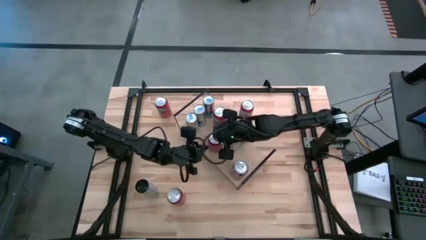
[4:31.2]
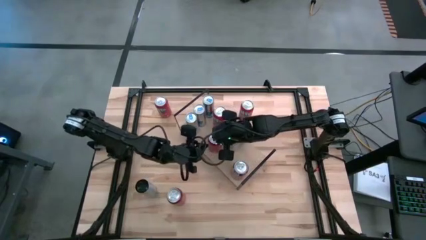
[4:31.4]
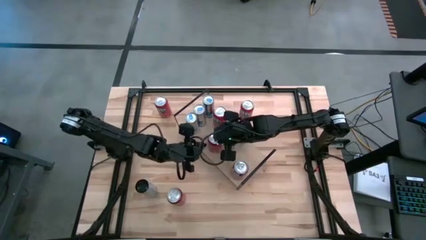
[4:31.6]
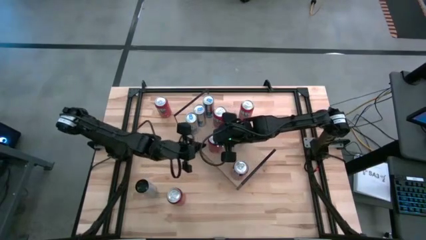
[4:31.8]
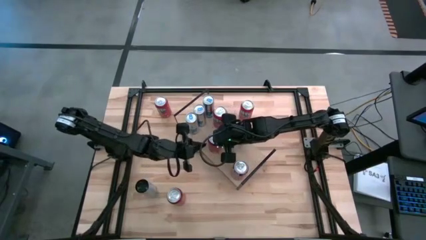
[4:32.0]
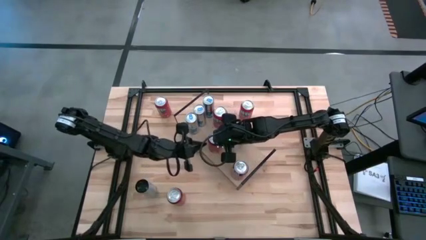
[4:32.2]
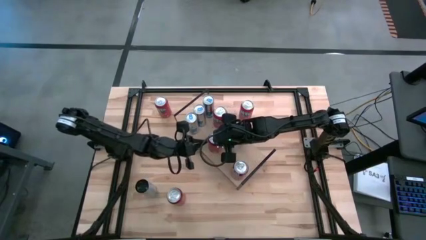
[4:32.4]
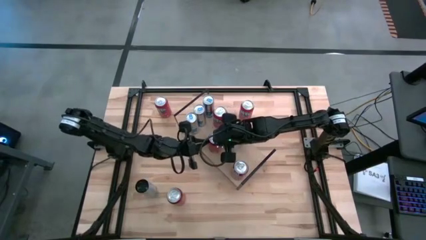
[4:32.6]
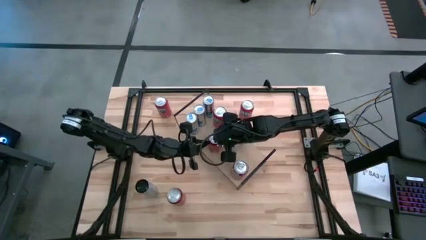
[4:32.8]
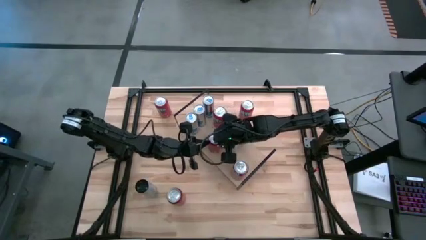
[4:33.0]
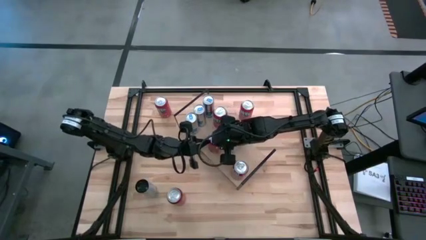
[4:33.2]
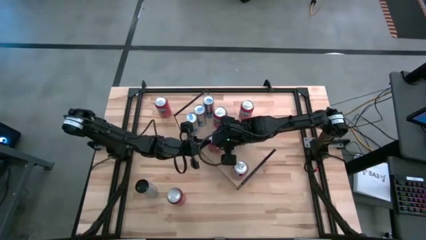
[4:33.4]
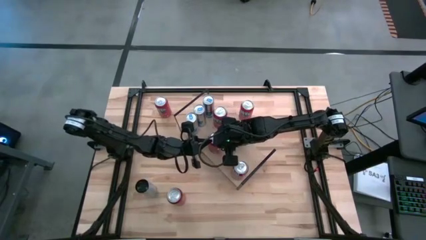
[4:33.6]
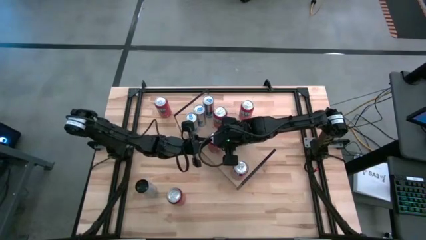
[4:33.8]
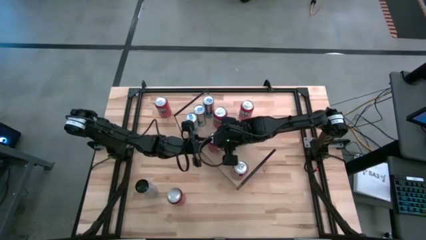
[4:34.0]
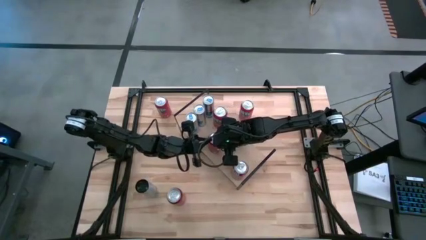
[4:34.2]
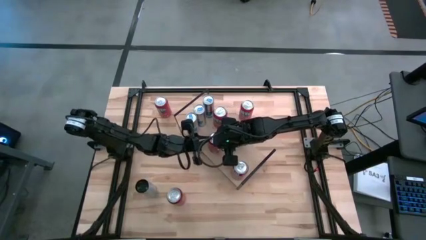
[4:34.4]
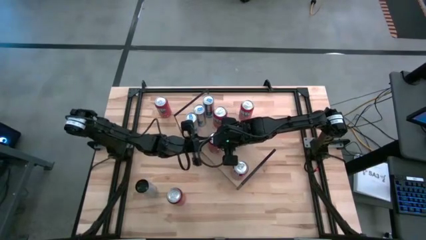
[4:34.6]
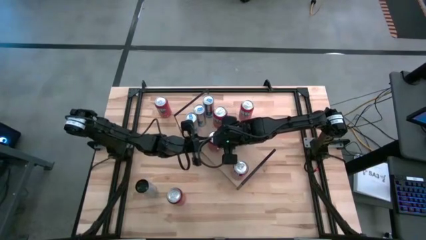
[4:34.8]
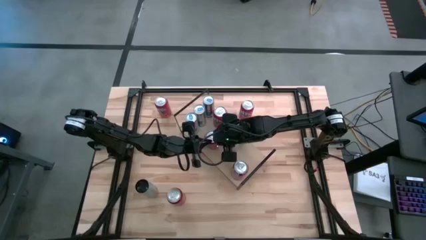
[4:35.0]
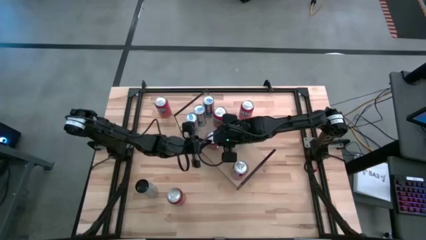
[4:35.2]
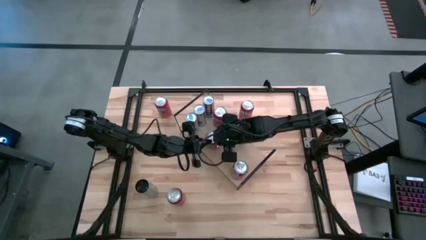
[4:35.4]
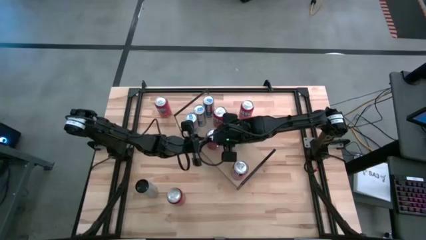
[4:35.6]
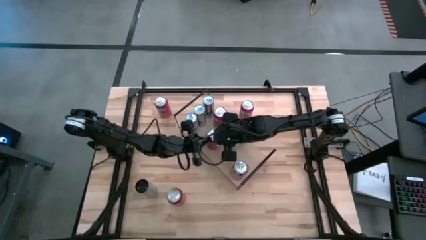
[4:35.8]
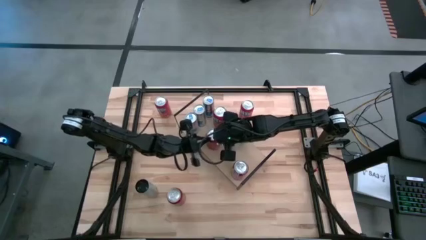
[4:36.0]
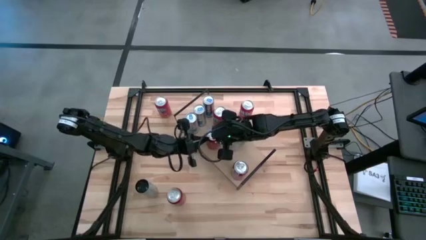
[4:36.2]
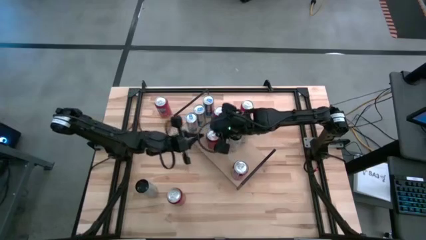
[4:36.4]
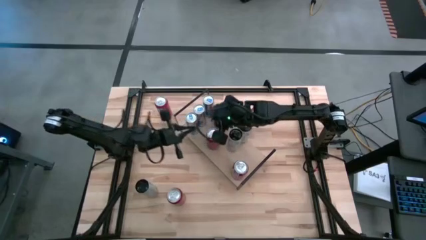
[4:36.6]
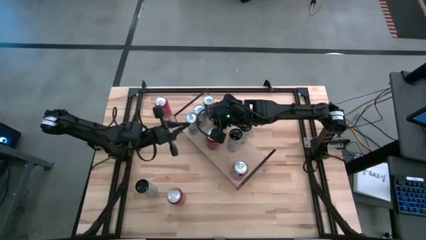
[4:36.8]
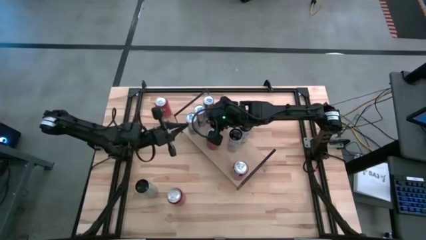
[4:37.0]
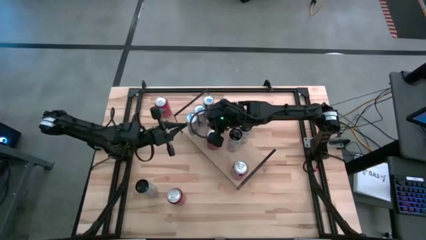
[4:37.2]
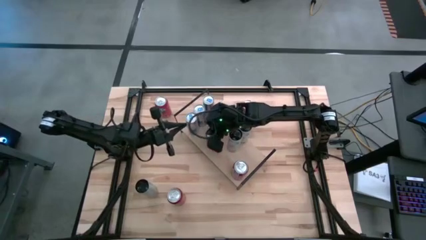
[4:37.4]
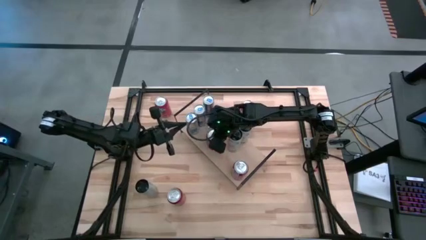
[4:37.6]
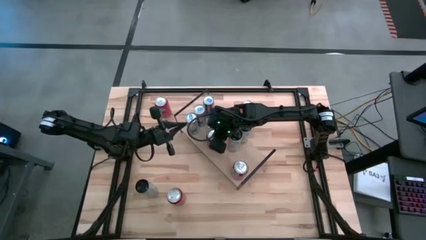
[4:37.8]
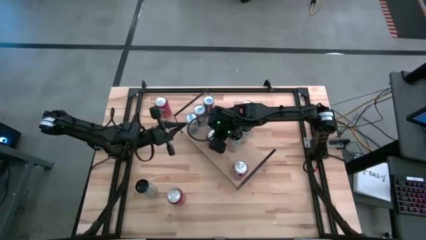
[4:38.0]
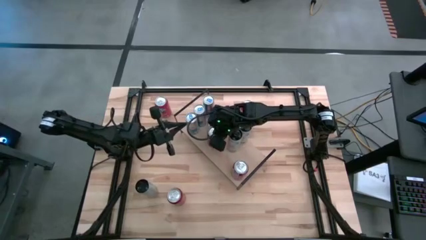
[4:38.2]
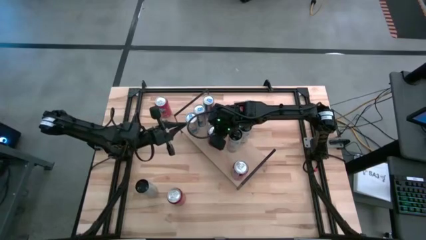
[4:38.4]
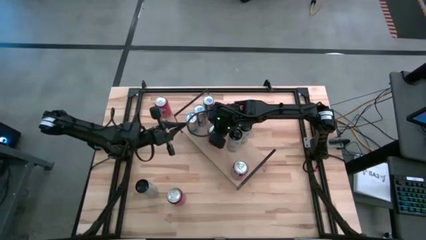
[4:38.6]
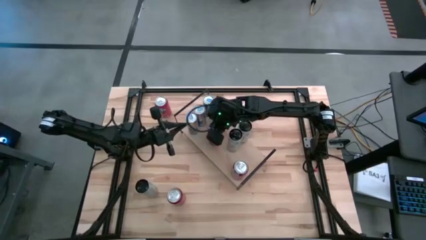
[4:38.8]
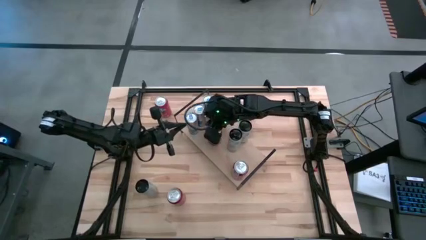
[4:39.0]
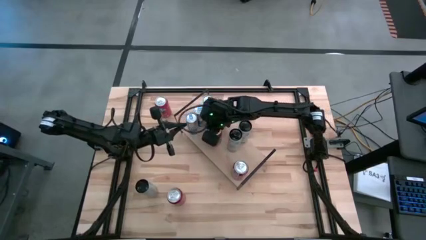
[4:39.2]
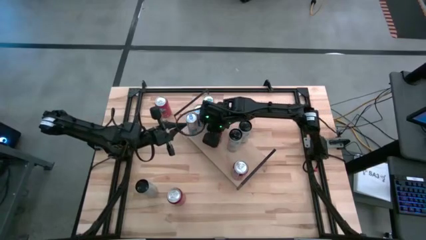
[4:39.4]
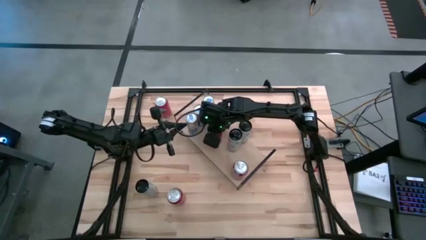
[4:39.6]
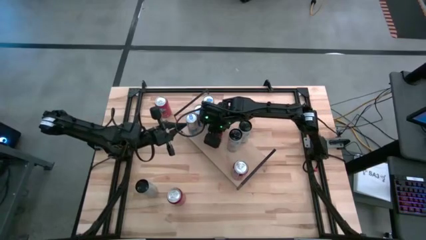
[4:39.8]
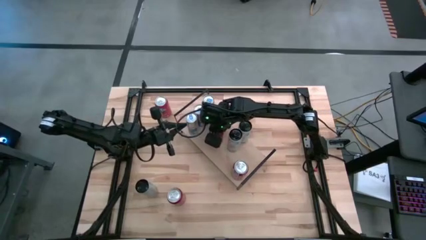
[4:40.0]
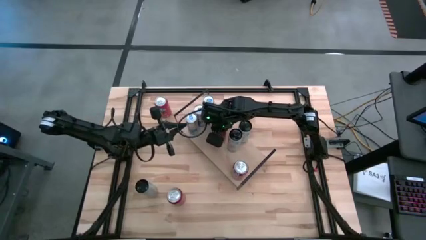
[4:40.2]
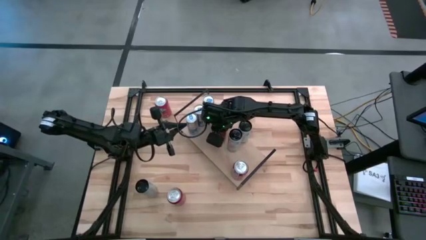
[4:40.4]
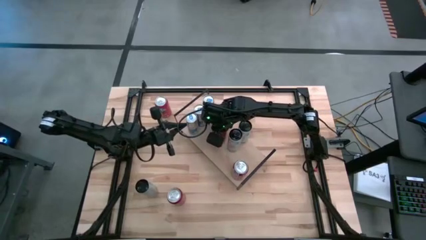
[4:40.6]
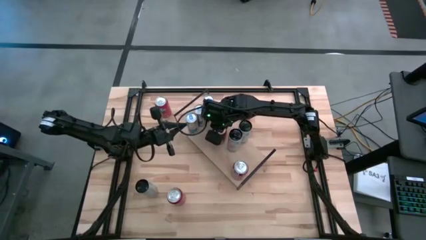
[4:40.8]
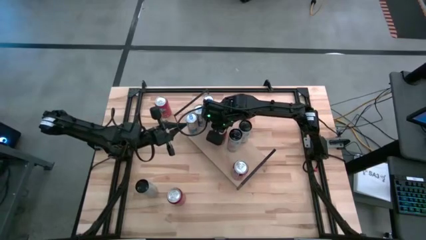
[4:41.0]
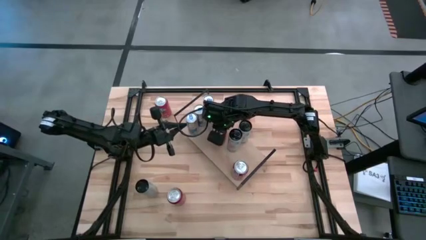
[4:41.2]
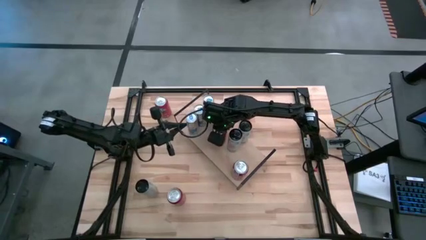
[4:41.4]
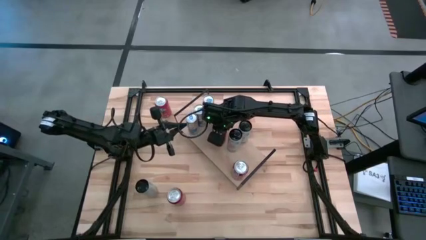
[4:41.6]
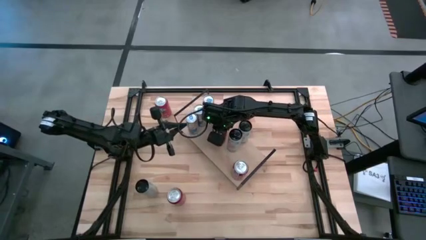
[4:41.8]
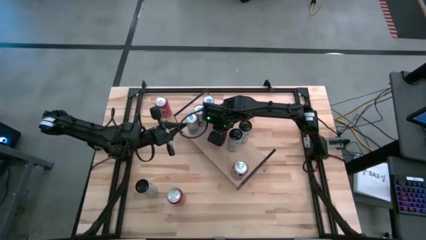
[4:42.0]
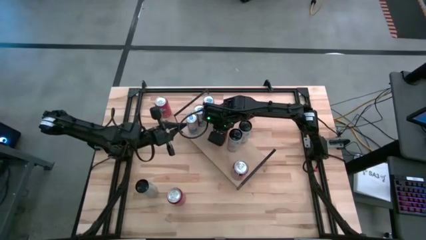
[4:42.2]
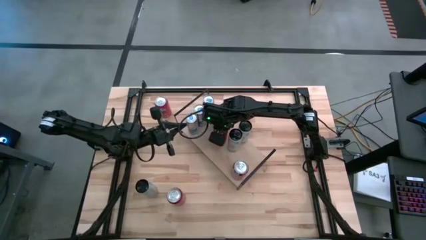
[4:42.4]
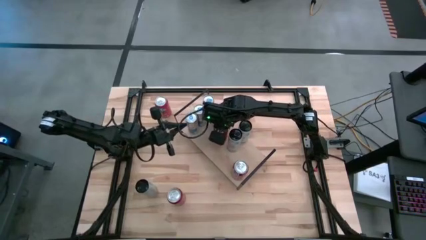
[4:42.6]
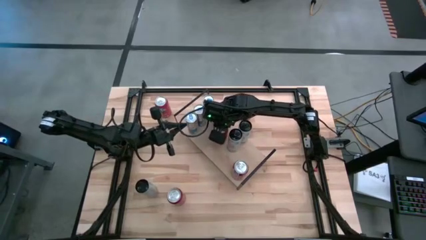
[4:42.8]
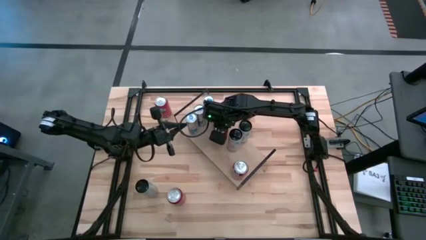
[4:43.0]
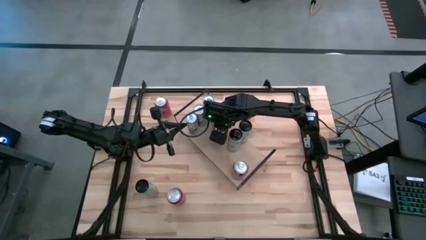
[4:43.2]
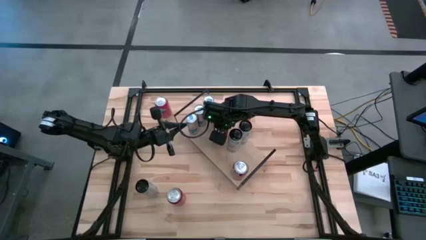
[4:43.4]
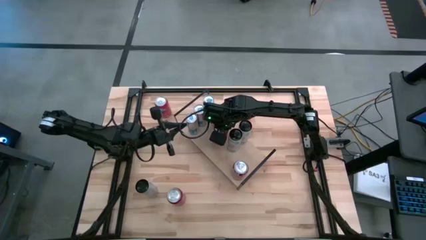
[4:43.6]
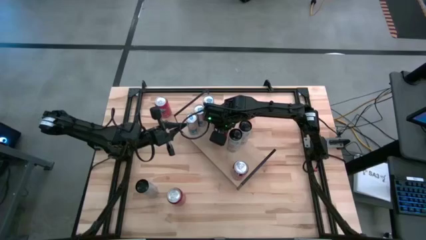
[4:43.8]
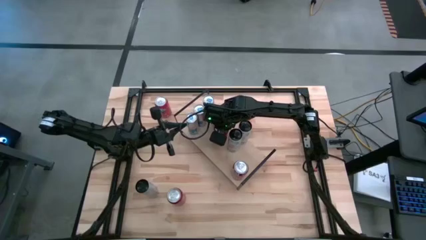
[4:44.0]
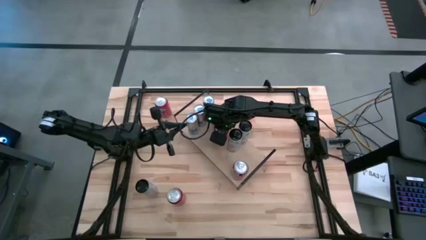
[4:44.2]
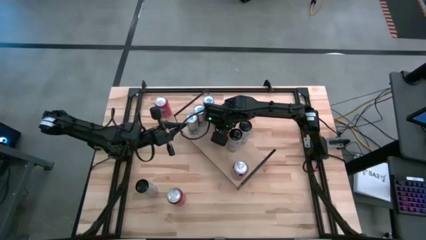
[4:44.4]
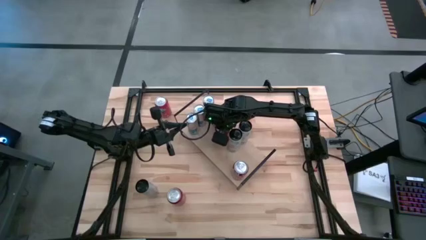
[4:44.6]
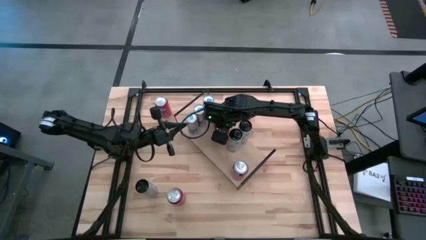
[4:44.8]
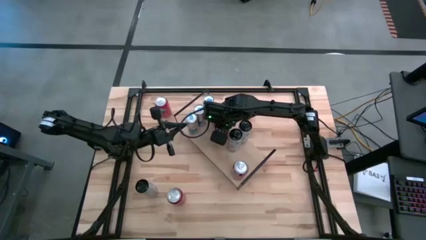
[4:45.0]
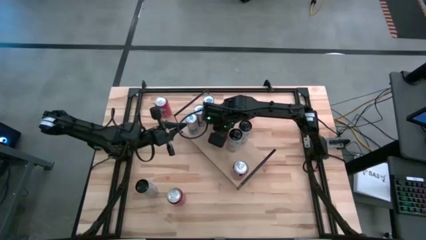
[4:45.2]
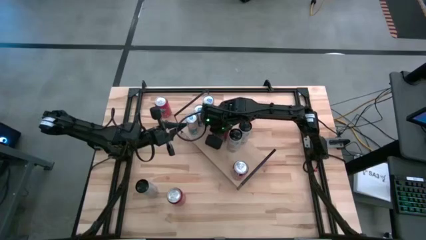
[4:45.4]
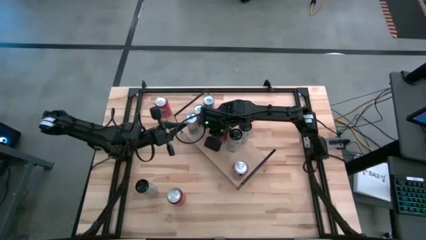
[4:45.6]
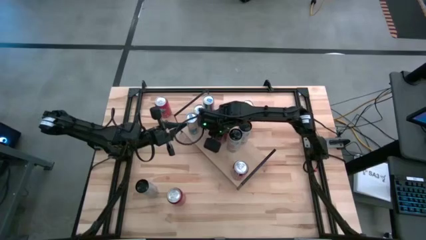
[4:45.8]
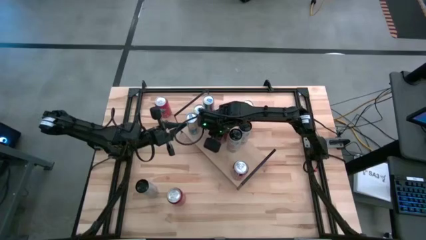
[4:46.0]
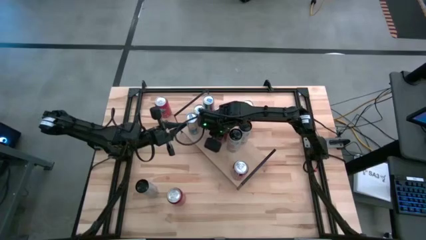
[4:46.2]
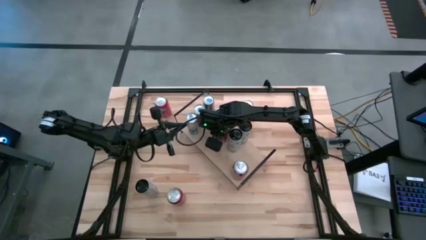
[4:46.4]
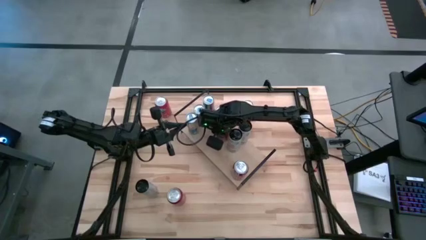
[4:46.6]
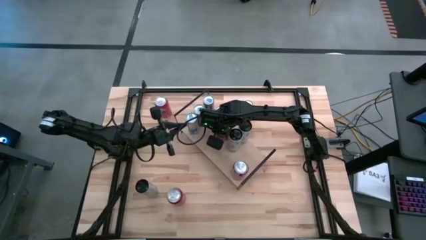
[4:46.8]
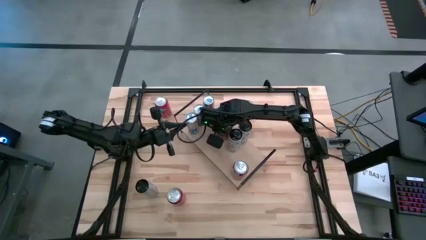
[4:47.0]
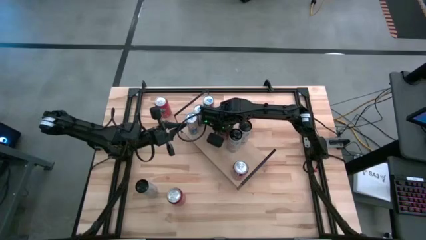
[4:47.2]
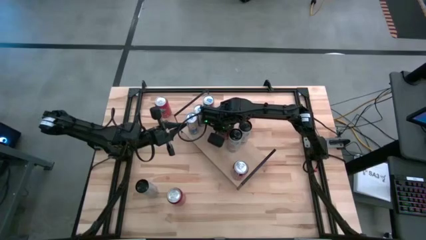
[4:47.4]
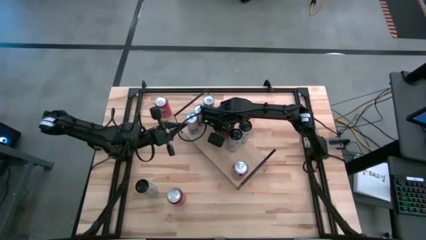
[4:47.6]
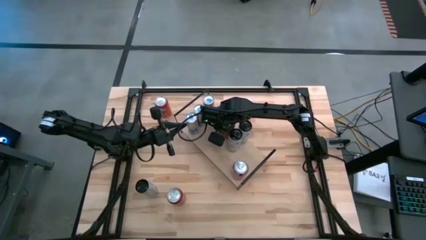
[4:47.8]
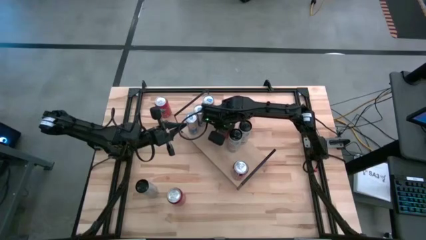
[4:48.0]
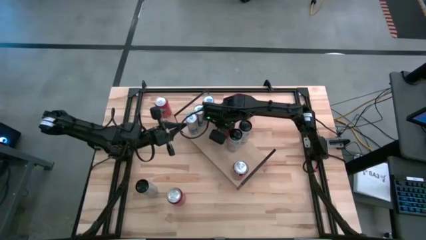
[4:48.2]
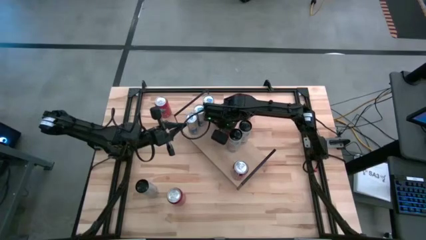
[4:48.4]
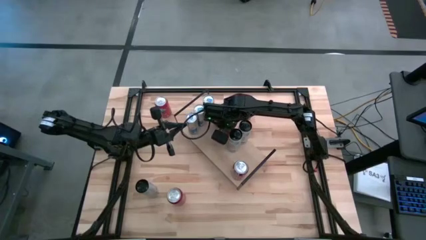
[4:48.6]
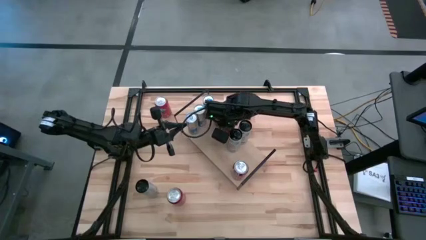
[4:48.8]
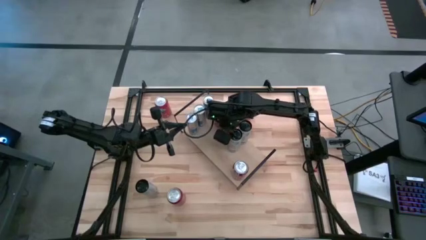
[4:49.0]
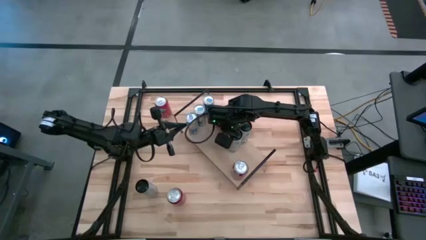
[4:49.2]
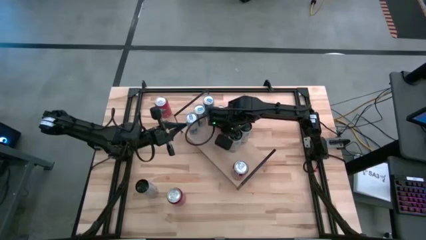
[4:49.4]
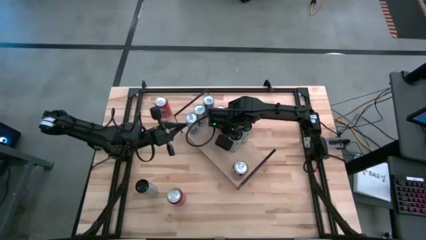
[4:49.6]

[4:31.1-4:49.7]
Task: Place canned beverage on shelf
Put the right soda can on the shelf
